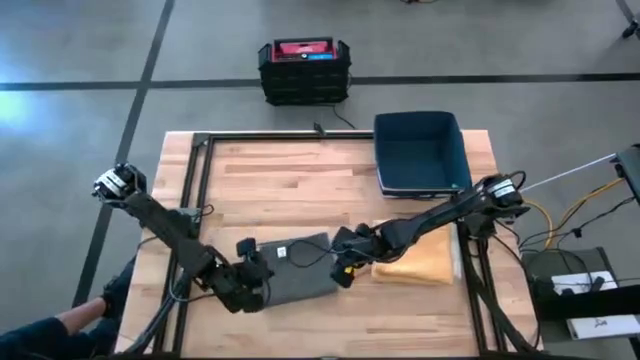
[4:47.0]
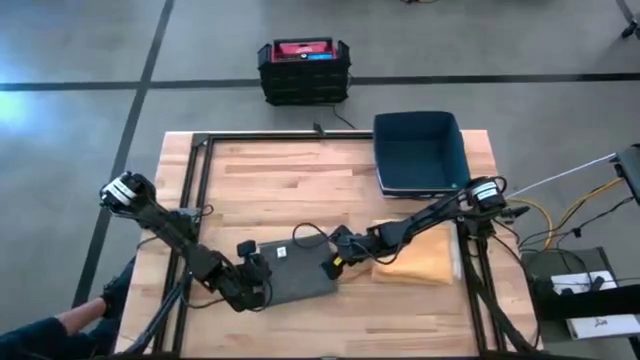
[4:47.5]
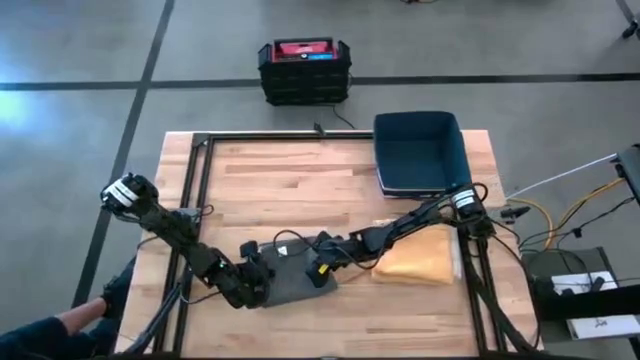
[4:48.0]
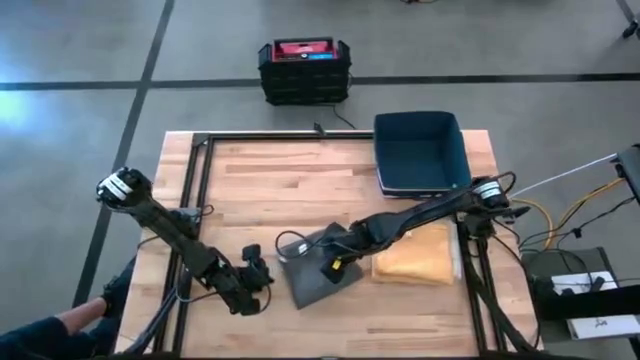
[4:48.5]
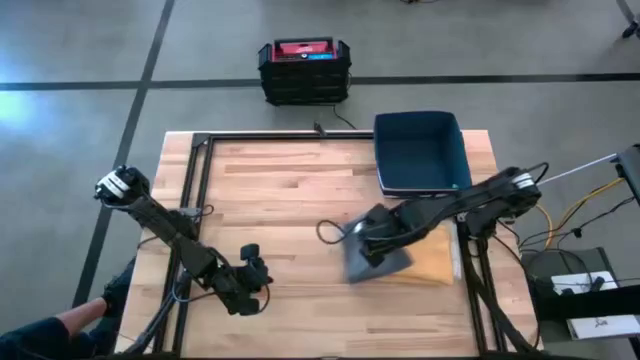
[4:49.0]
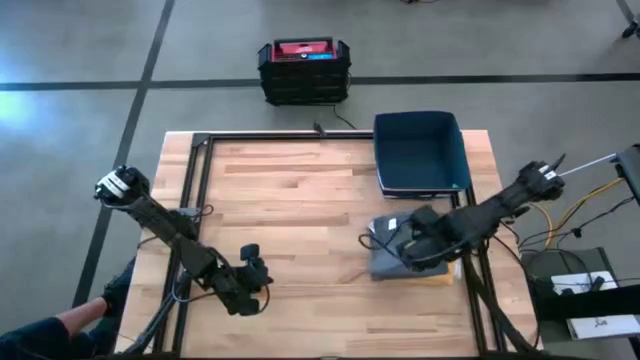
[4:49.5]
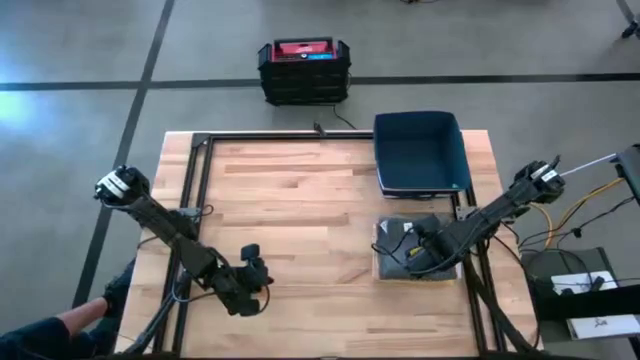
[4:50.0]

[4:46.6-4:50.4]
Task: Fold towel
Stack the folded gray towel on top of the folded yellow towel

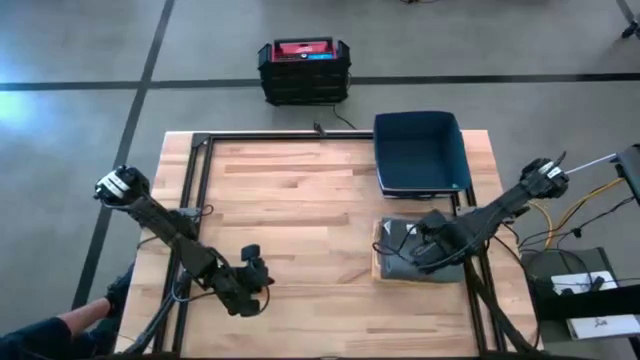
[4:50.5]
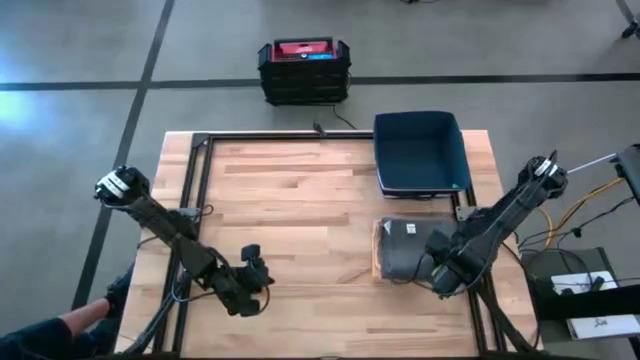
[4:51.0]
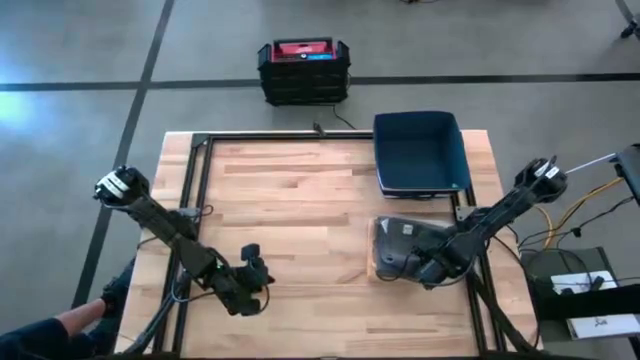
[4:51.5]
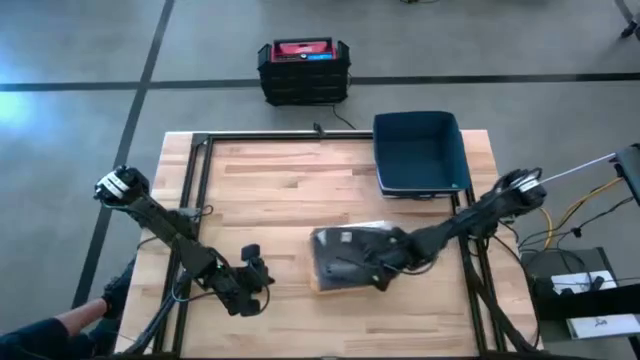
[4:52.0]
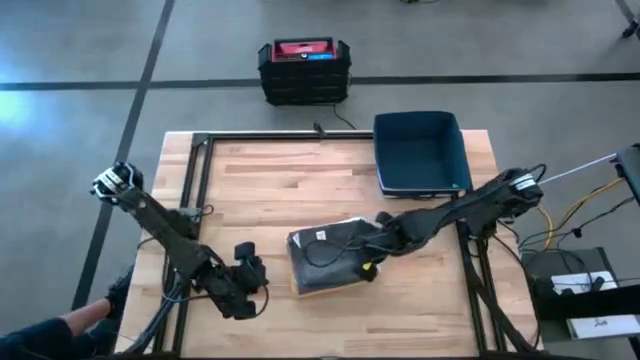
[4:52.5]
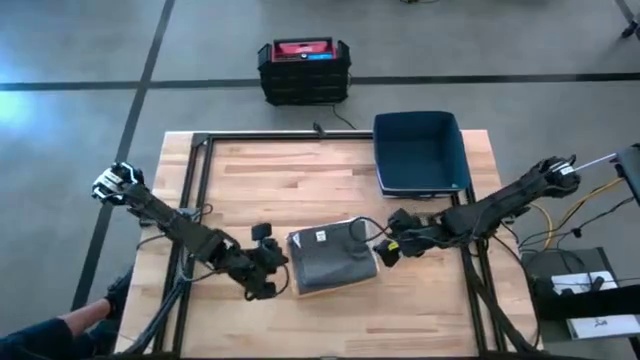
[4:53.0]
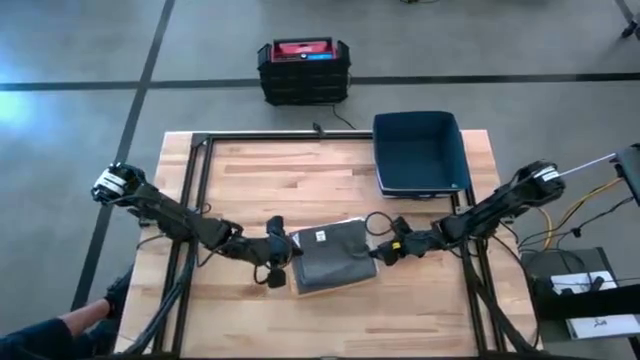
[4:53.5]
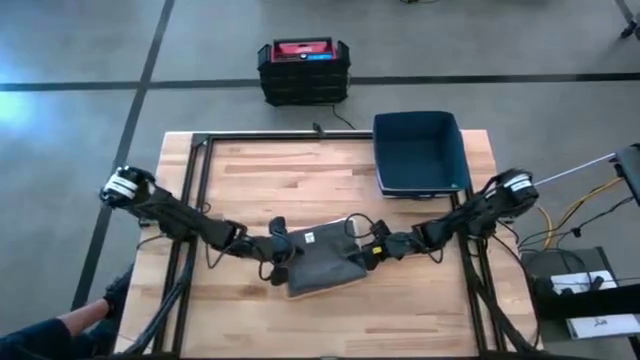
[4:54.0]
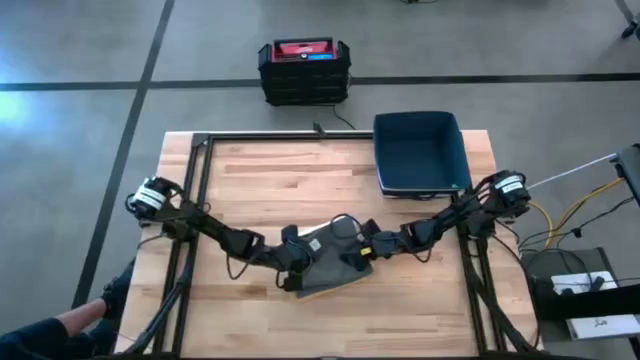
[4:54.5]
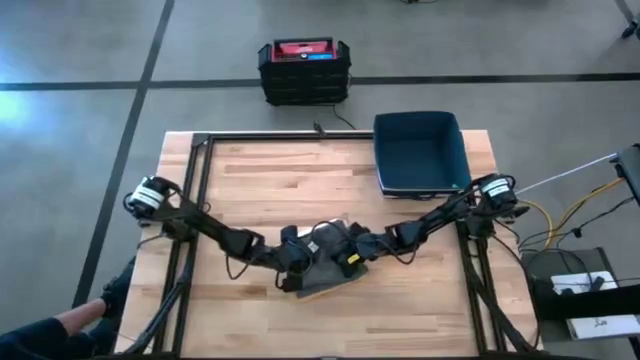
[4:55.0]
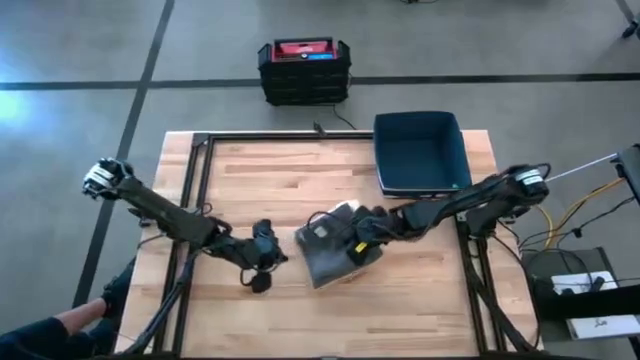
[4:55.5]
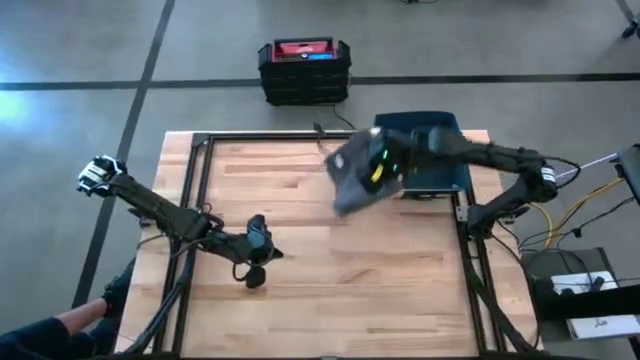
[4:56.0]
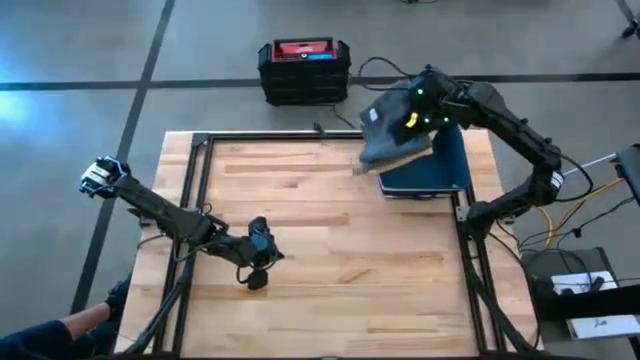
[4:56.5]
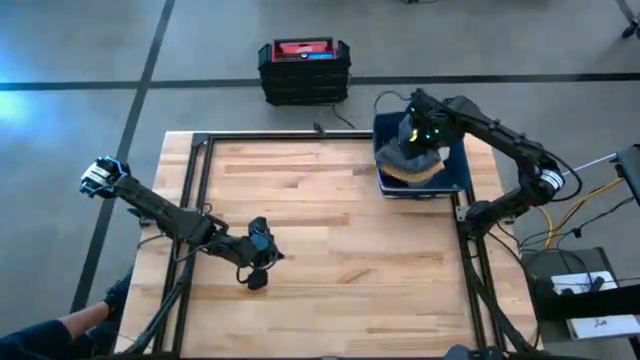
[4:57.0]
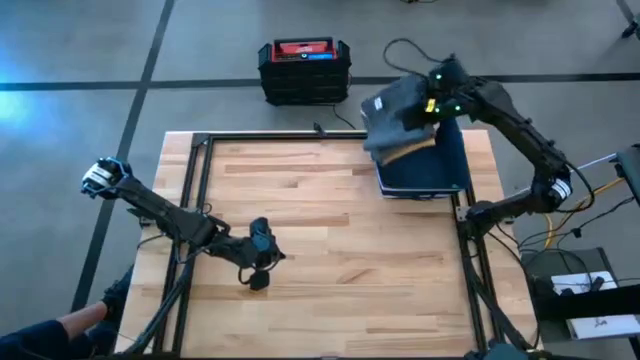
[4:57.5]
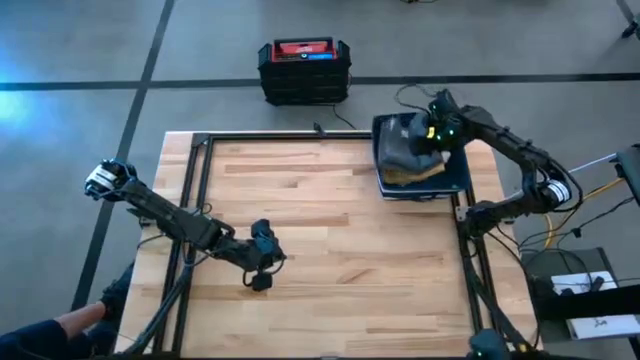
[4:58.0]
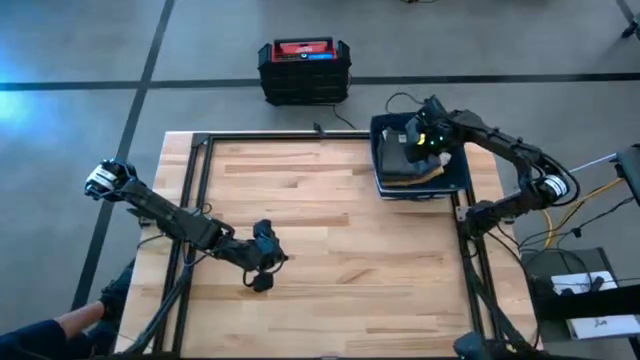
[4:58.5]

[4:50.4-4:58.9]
Put the stacked folded towels into the blue laundry organizer

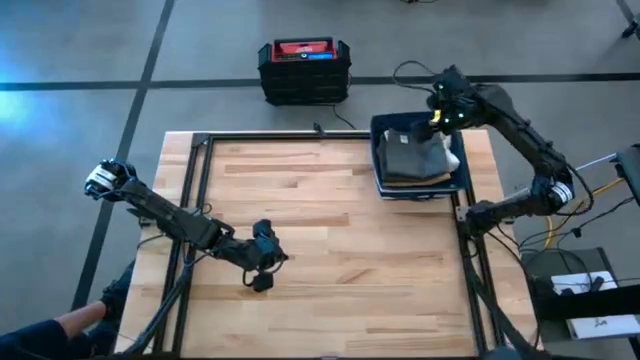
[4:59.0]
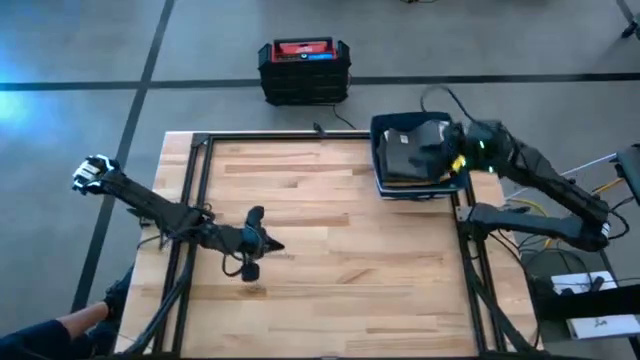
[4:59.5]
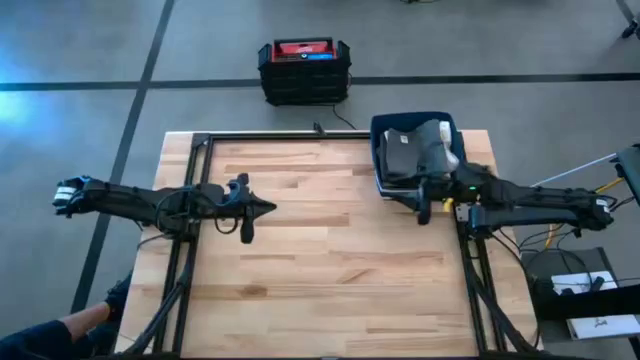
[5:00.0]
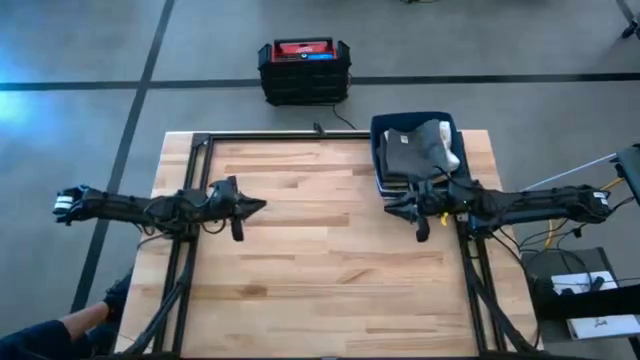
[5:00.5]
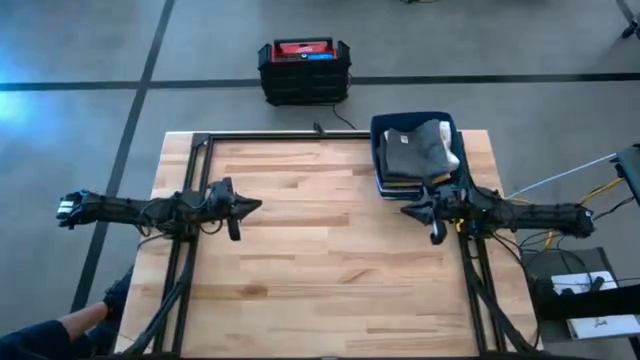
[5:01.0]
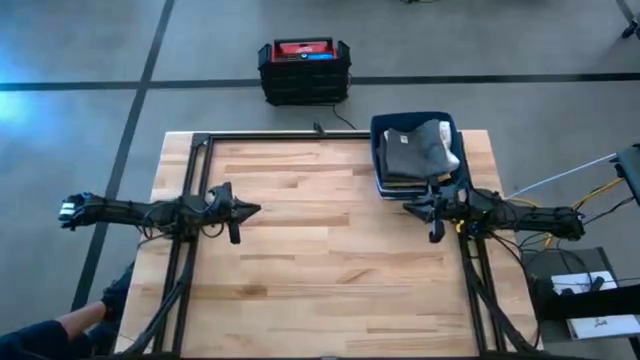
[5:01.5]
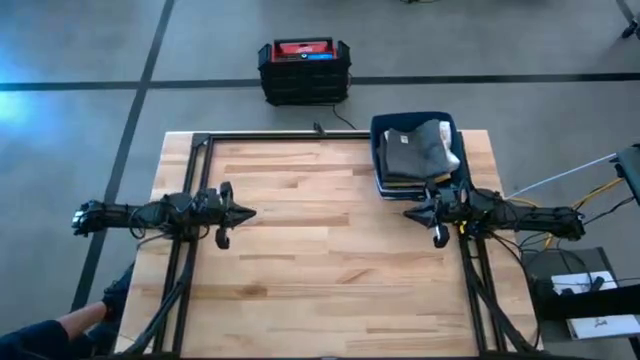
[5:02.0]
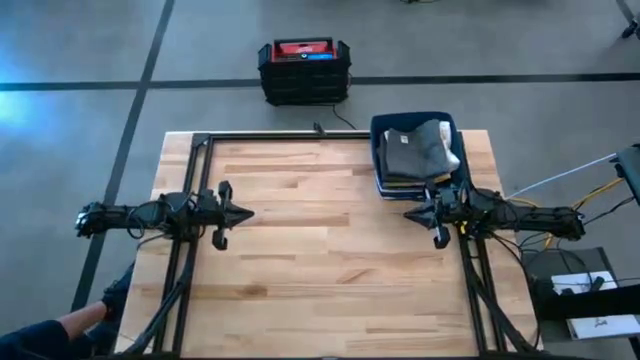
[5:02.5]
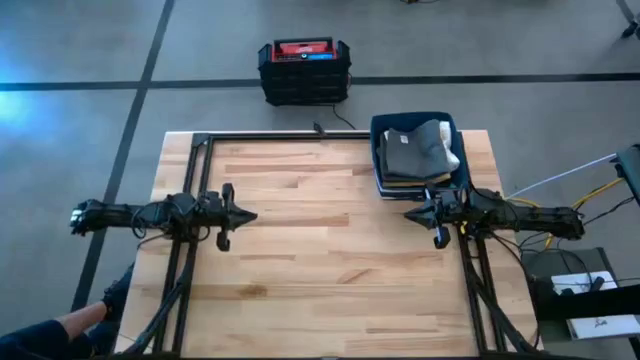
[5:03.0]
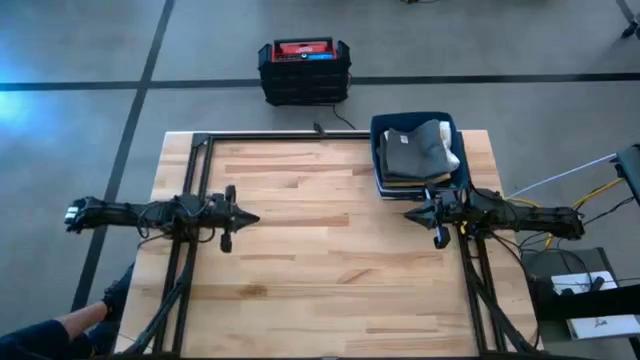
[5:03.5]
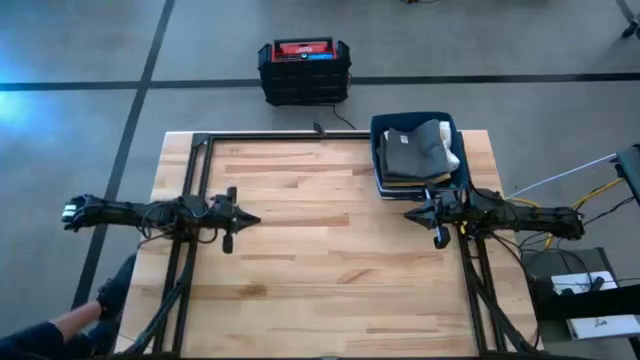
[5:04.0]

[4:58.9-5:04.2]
Return to Home Position

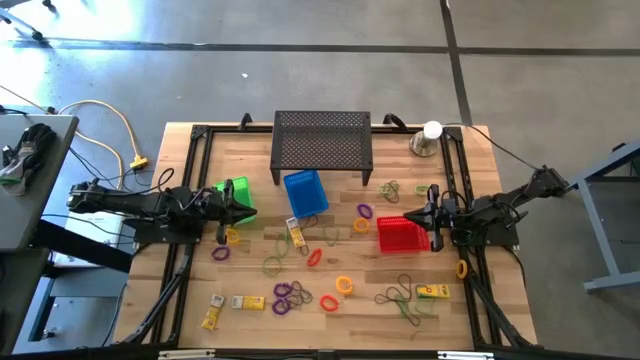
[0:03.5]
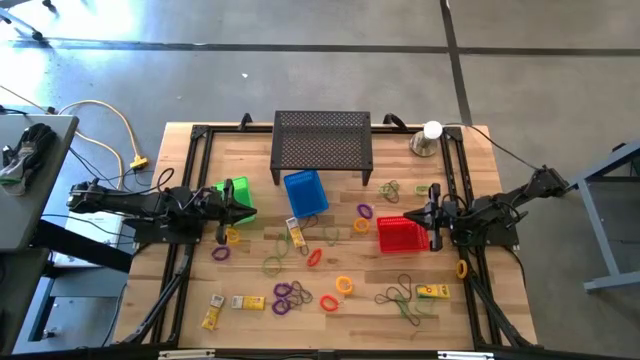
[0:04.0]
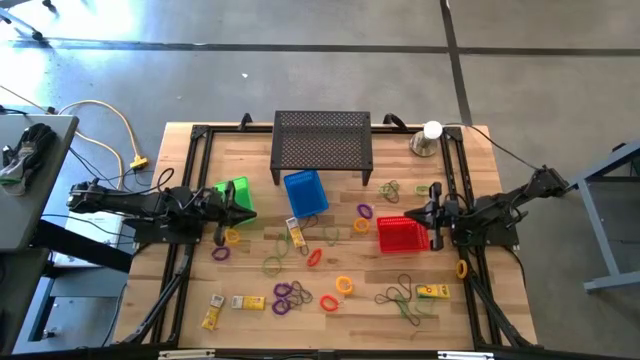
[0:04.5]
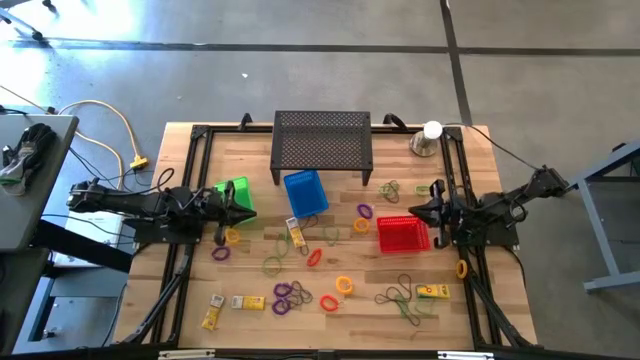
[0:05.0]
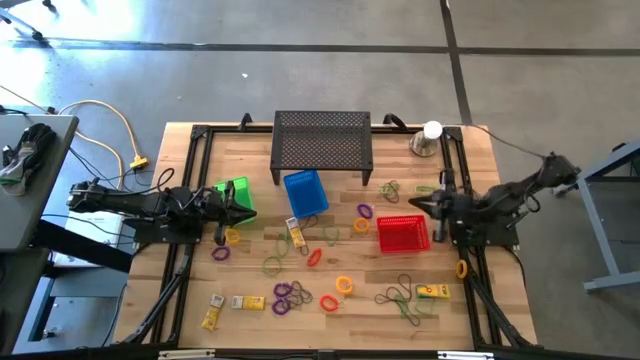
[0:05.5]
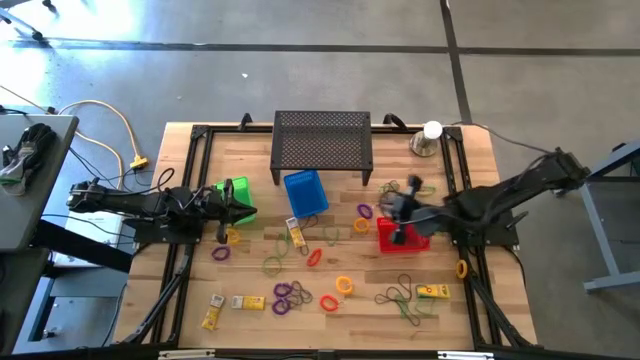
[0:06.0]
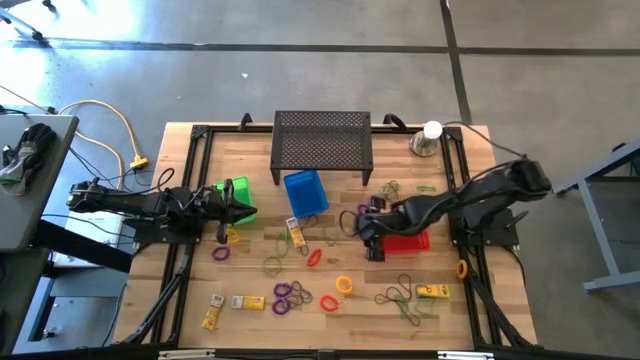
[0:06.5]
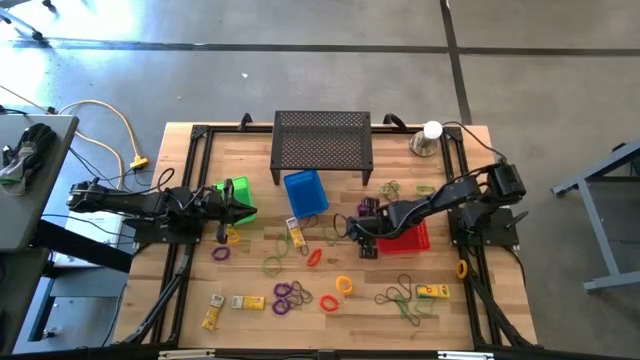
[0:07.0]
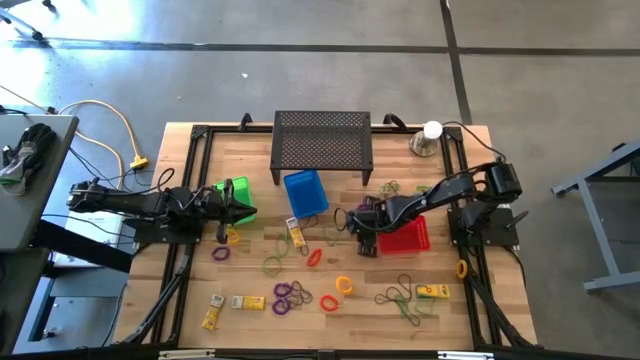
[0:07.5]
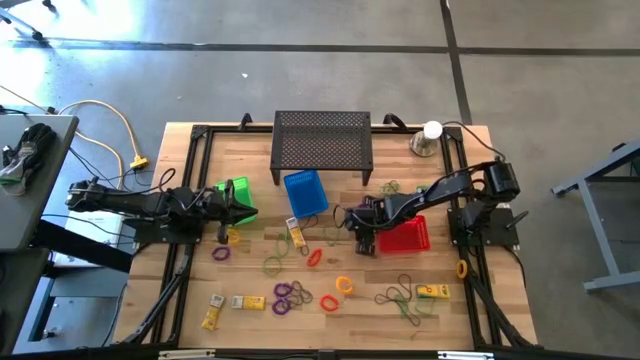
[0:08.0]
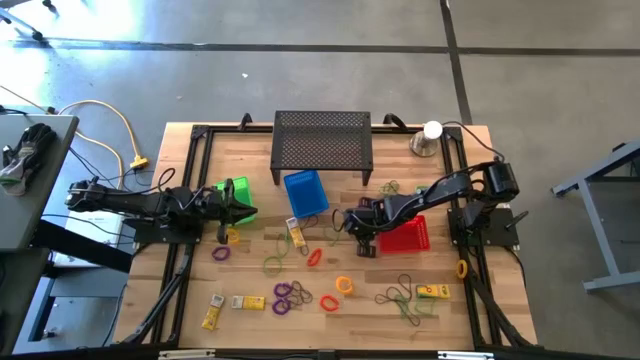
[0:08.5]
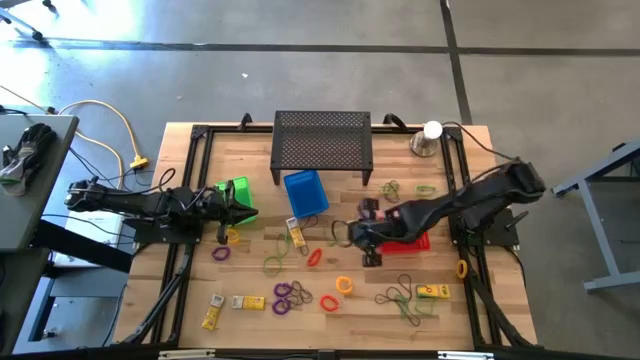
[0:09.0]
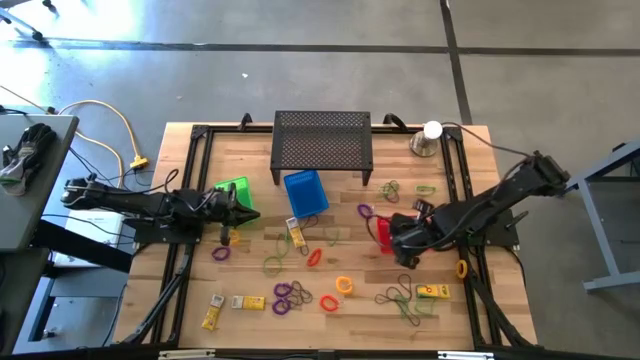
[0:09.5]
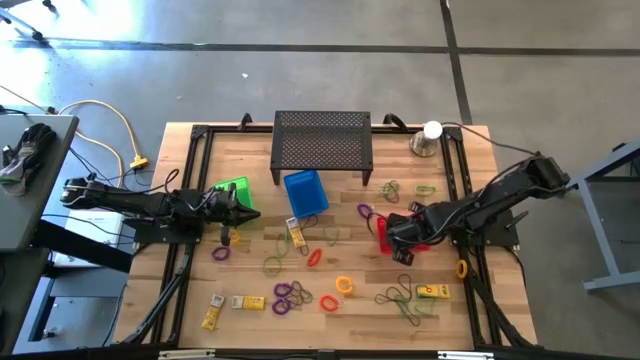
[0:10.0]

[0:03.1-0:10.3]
Task: Pick & Place Office Desk Supplies
Put the orange spring keychain into the red basket
